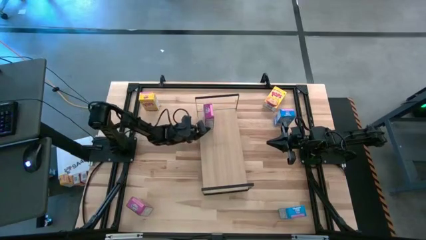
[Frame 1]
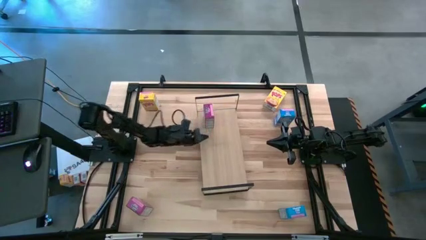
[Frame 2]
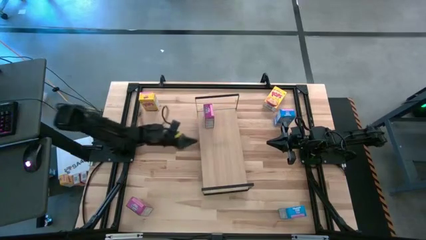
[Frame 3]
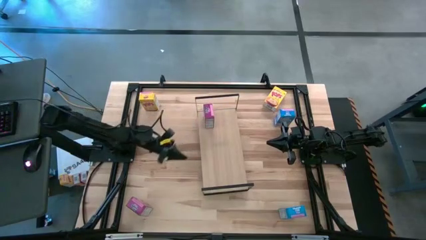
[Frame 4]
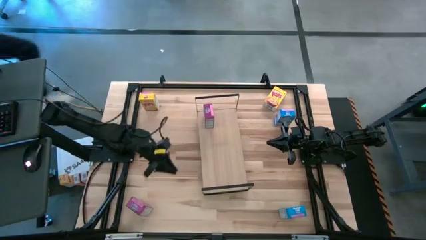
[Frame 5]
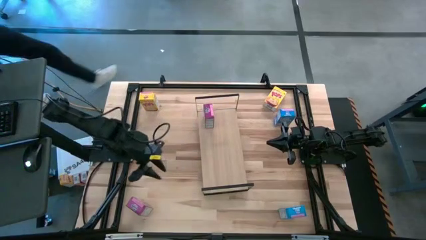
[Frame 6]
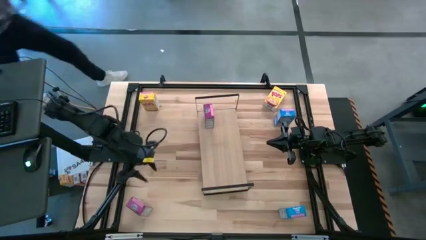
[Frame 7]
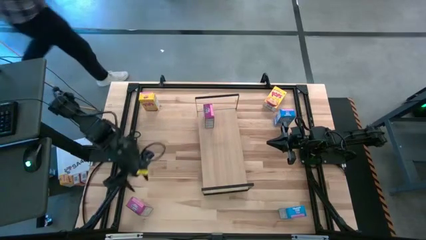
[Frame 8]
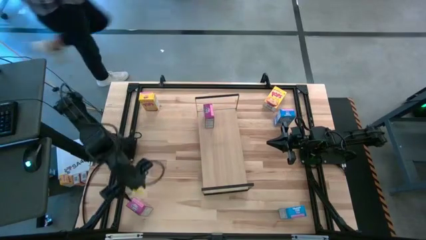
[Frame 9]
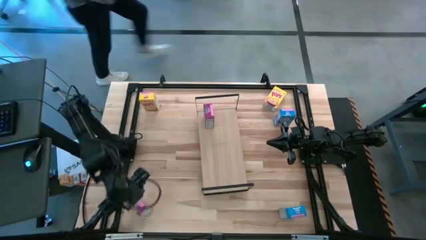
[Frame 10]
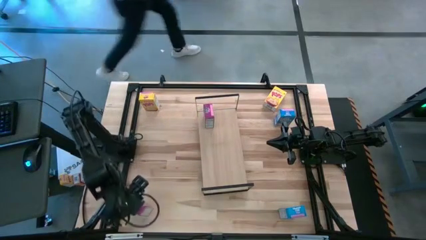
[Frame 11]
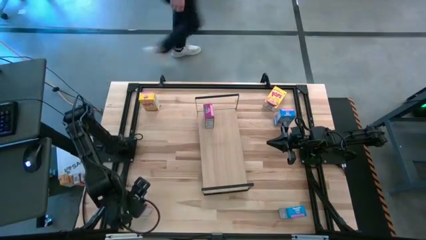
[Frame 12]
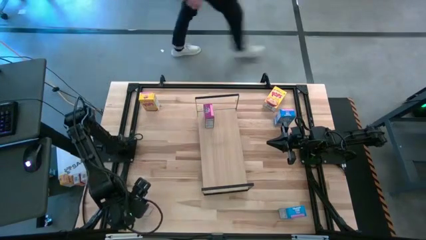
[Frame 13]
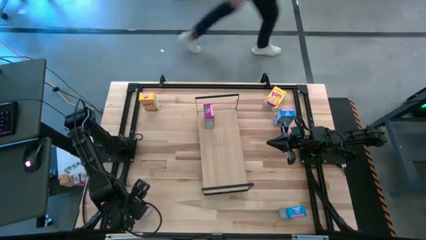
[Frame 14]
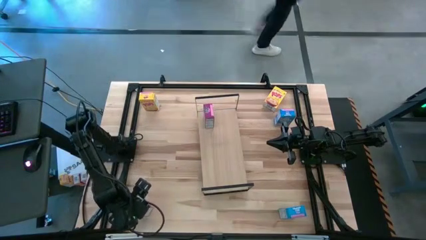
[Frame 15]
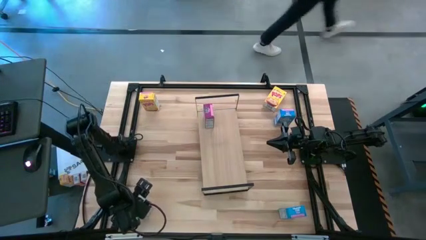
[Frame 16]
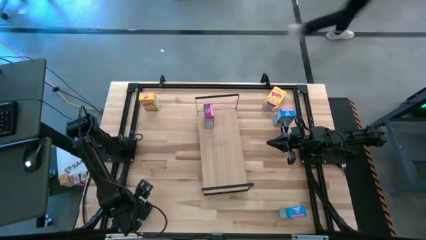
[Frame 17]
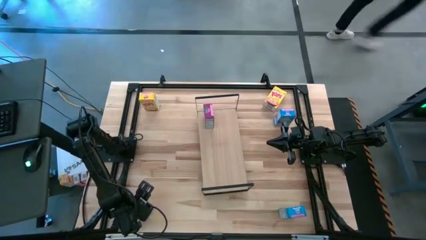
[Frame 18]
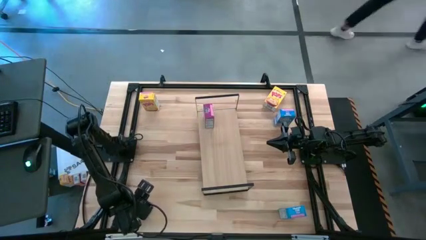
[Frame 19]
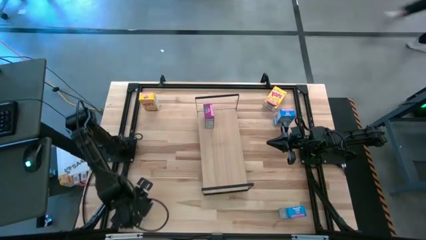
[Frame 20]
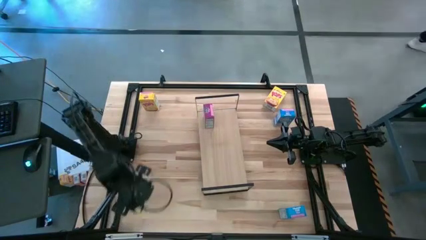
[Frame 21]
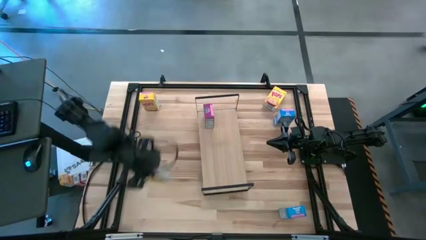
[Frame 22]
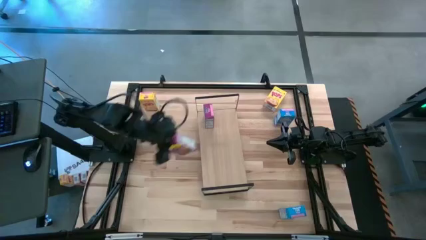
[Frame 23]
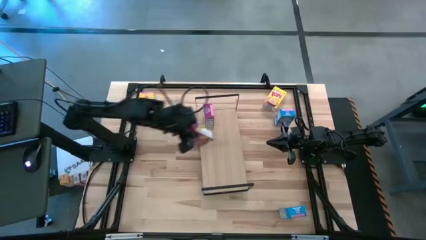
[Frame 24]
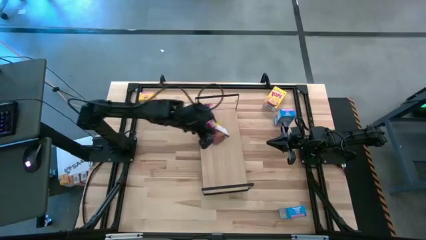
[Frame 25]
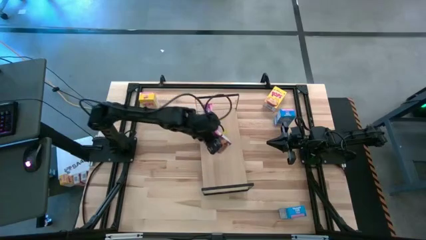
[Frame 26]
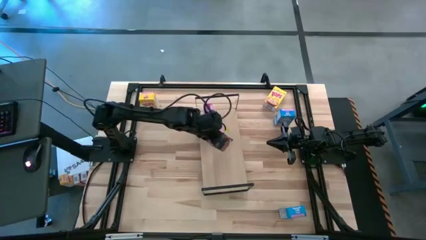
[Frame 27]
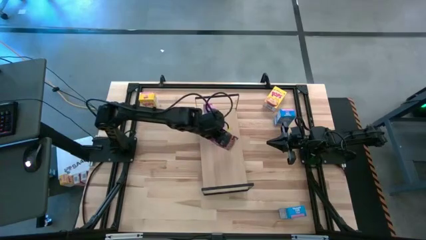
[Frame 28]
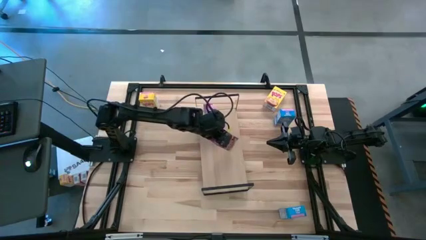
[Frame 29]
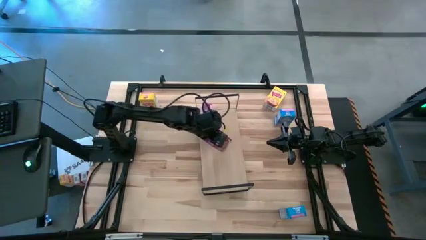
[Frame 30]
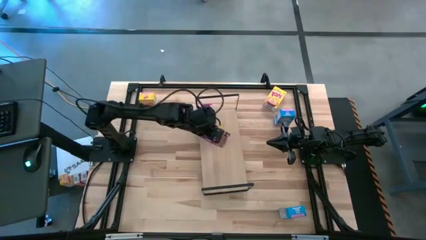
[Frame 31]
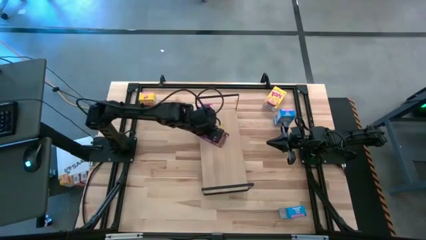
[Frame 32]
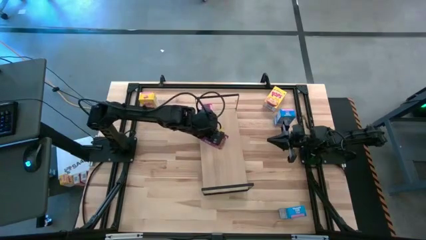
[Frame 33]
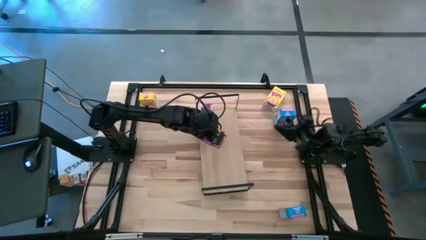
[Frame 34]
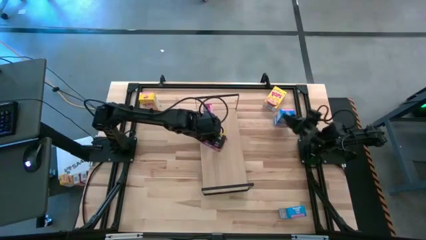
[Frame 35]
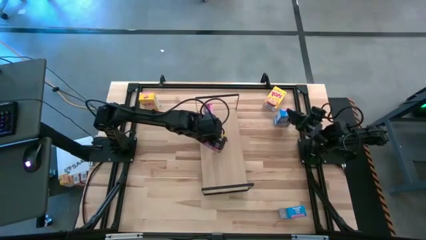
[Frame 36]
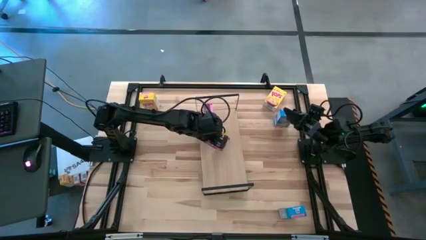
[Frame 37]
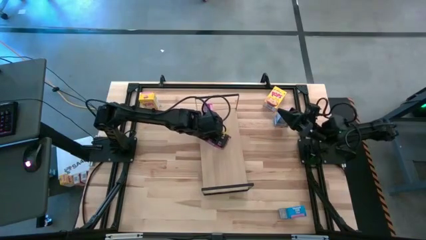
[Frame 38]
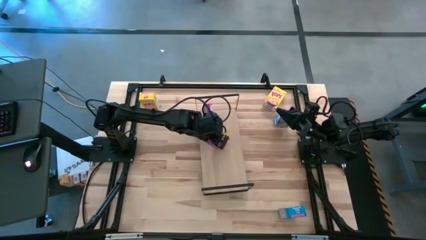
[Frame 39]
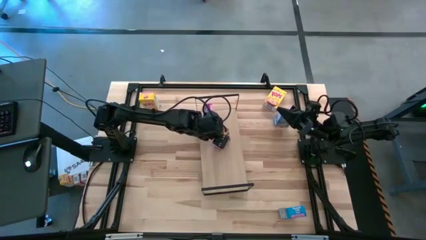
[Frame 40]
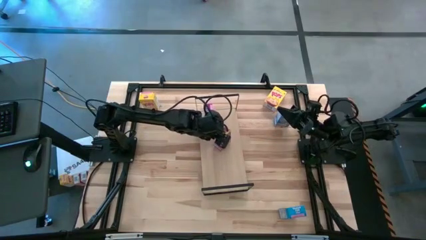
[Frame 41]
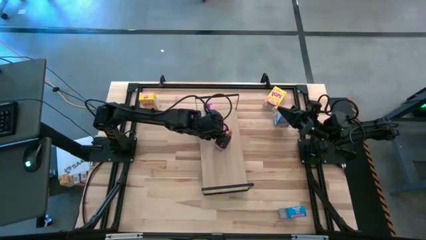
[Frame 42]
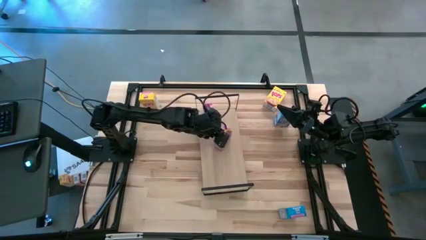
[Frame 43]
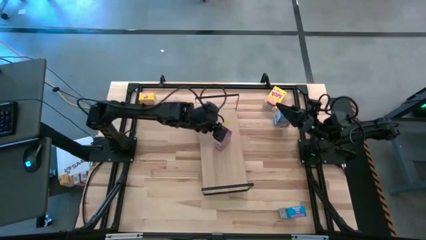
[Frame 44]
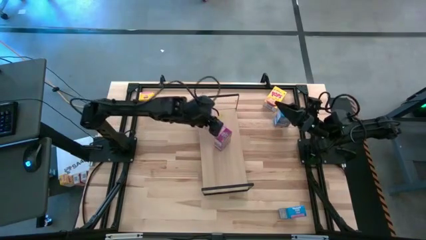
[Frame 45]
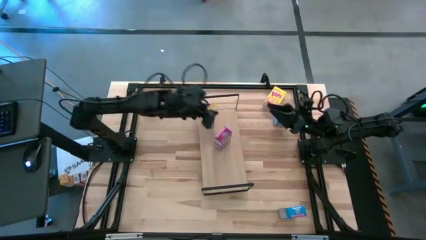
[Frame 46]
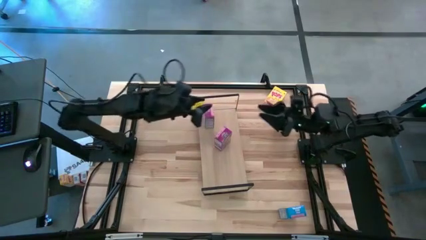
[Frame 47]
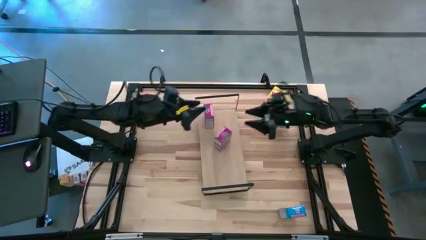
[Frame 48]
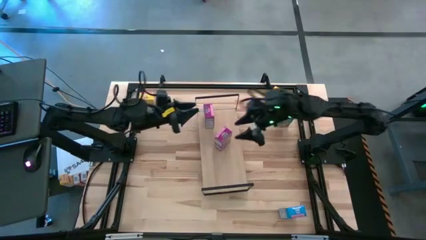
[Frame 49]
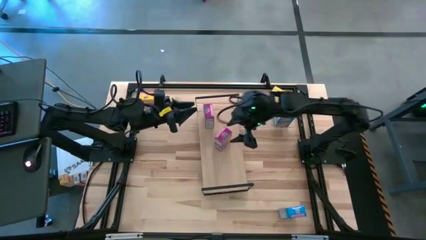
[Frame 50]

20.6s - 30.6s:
Task: Stack cereal on shelf
Put the purple cereal box on the shelf aligned with the other purple cereal box
